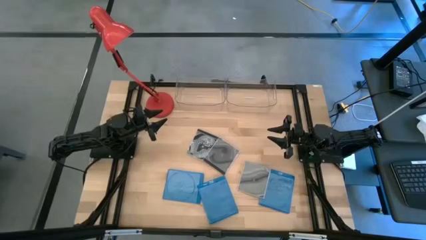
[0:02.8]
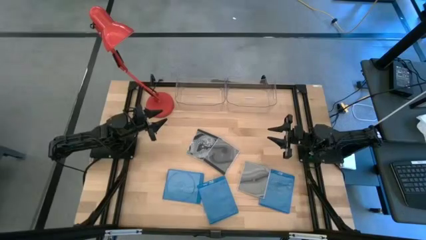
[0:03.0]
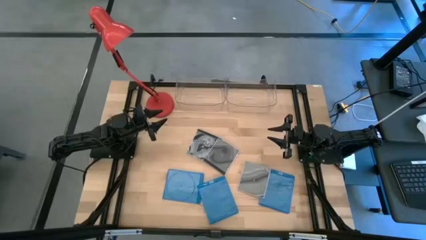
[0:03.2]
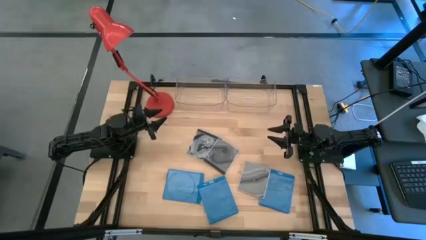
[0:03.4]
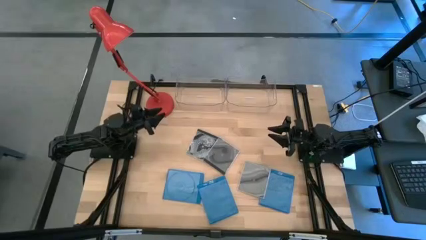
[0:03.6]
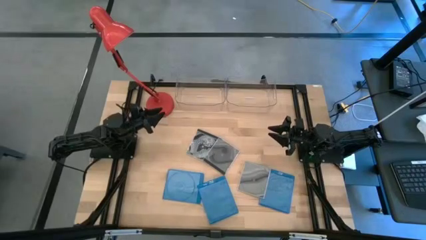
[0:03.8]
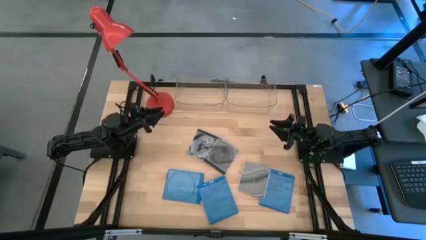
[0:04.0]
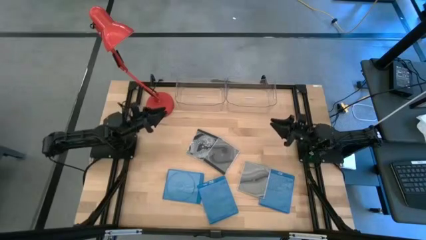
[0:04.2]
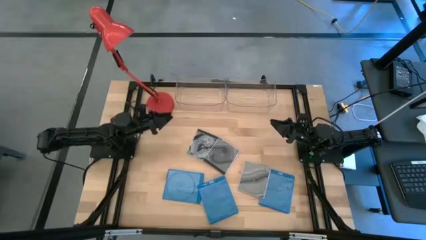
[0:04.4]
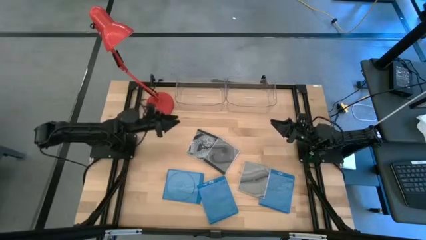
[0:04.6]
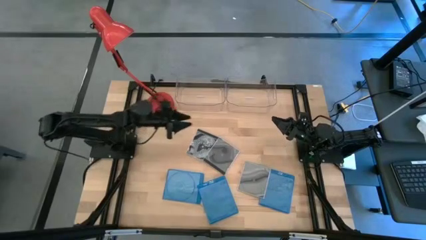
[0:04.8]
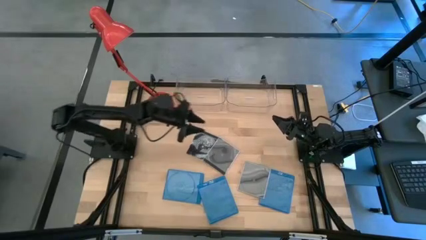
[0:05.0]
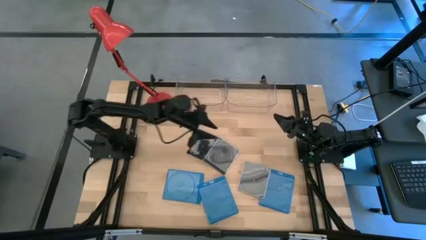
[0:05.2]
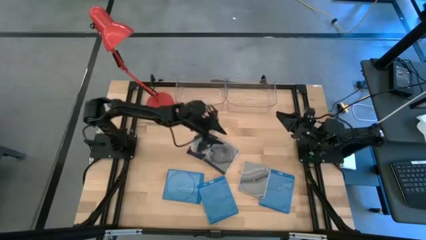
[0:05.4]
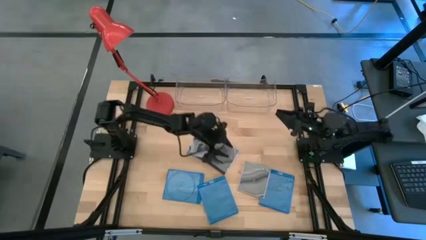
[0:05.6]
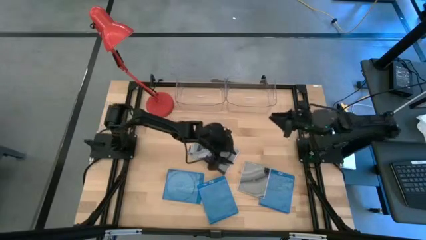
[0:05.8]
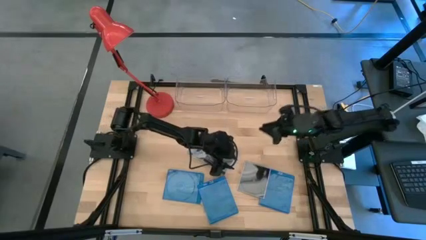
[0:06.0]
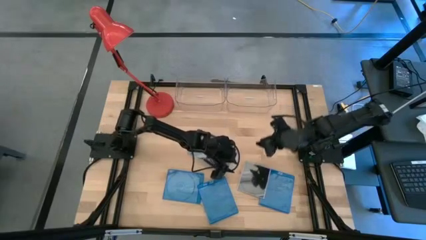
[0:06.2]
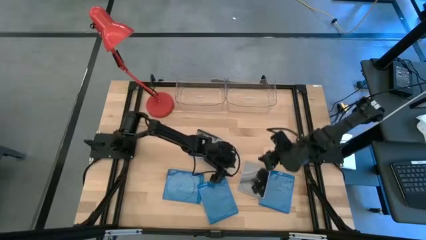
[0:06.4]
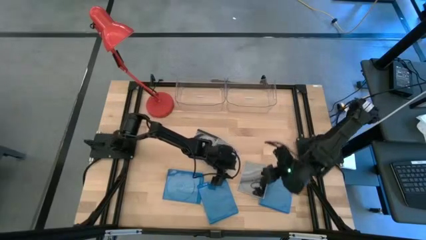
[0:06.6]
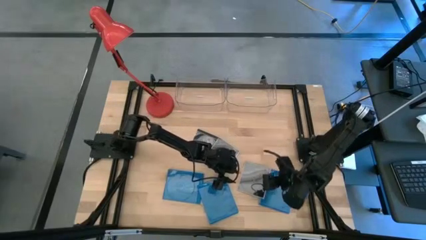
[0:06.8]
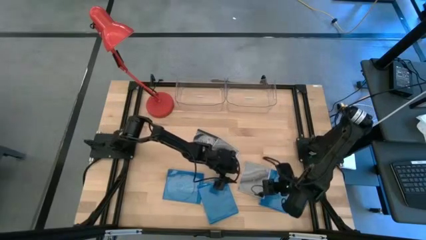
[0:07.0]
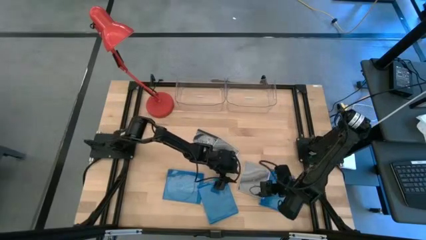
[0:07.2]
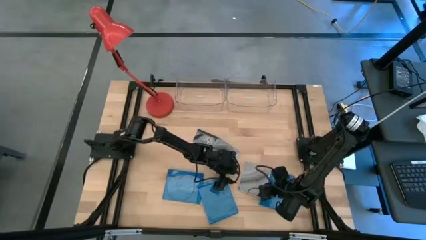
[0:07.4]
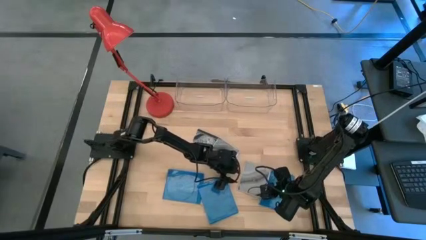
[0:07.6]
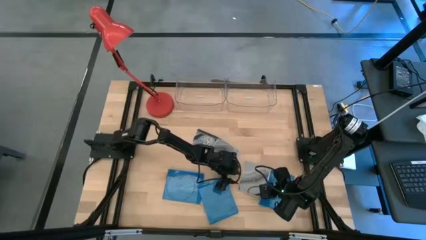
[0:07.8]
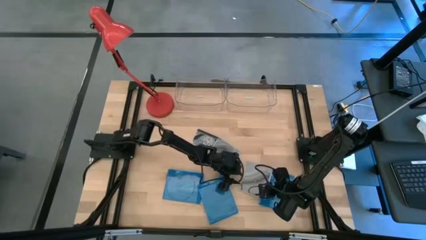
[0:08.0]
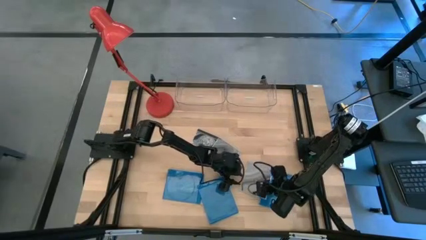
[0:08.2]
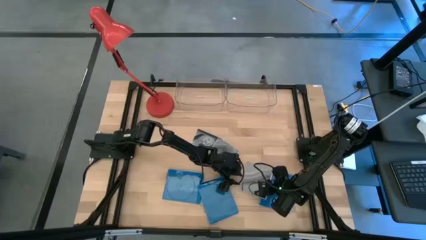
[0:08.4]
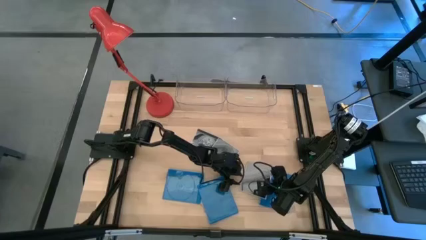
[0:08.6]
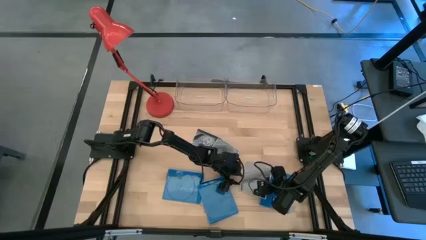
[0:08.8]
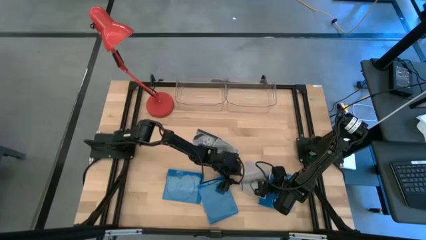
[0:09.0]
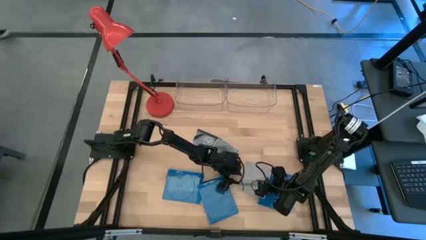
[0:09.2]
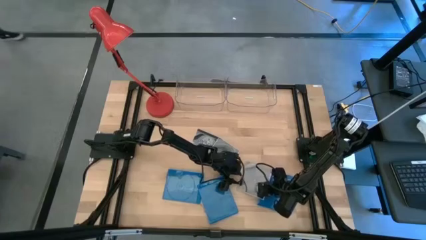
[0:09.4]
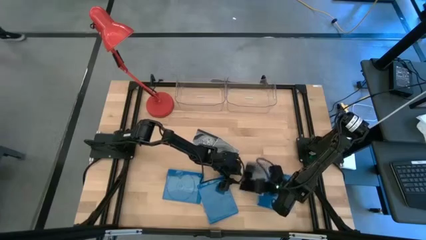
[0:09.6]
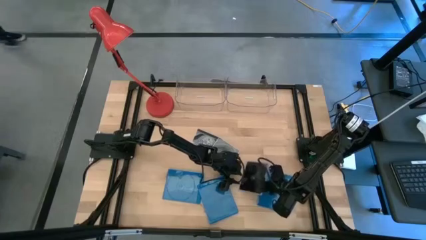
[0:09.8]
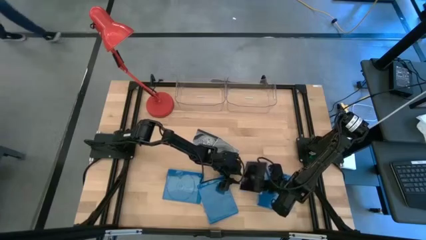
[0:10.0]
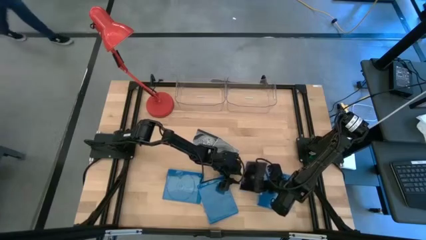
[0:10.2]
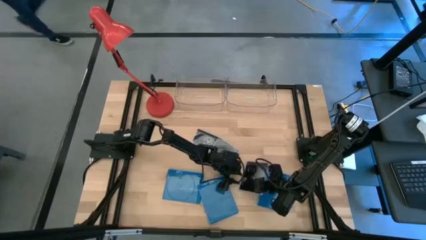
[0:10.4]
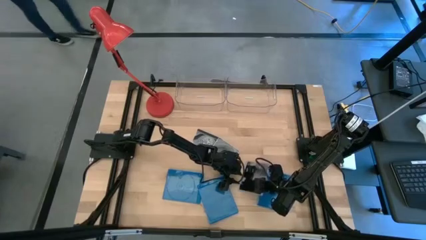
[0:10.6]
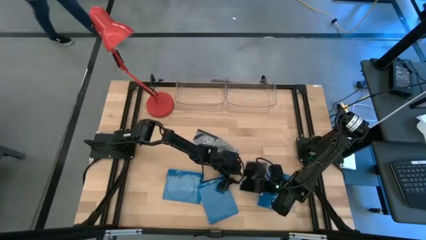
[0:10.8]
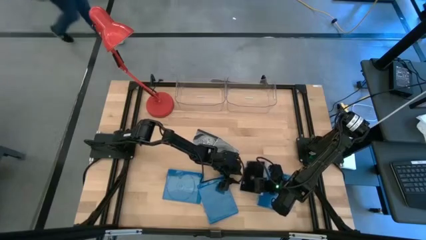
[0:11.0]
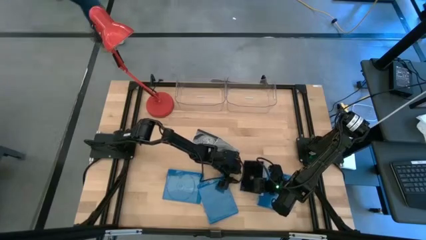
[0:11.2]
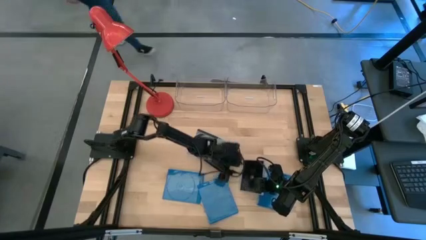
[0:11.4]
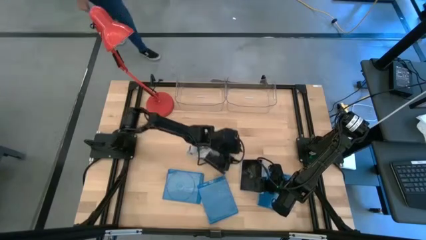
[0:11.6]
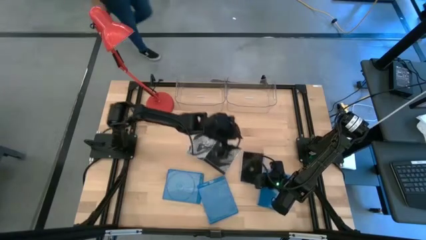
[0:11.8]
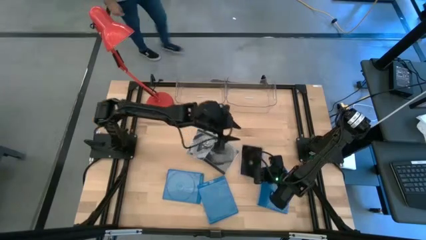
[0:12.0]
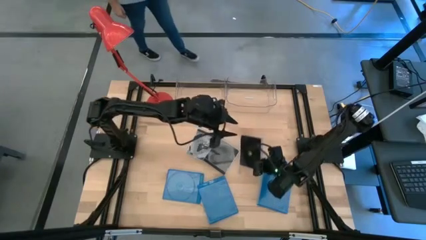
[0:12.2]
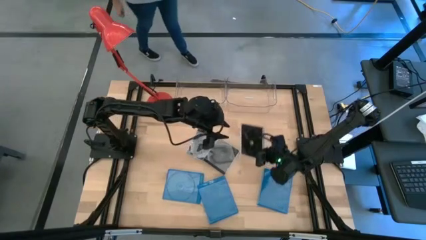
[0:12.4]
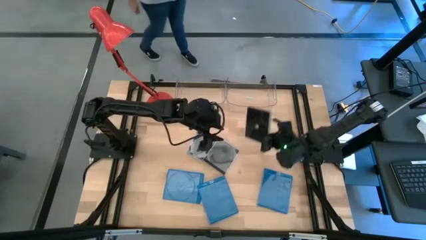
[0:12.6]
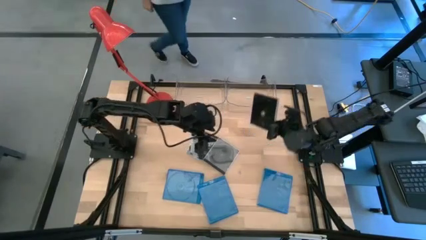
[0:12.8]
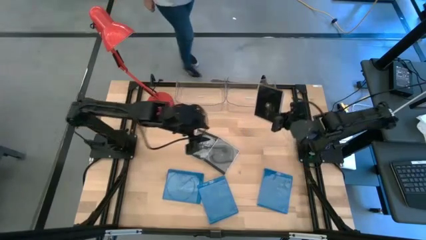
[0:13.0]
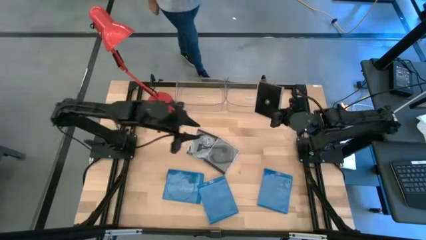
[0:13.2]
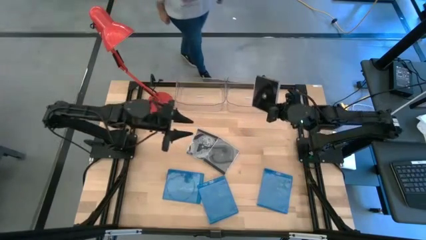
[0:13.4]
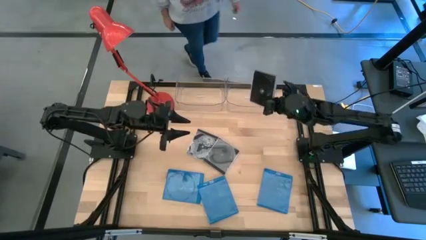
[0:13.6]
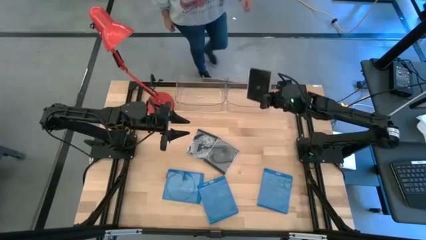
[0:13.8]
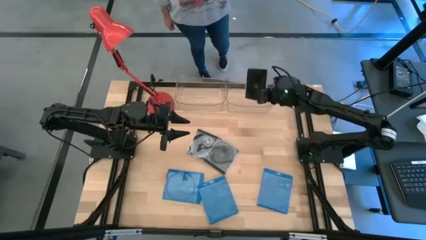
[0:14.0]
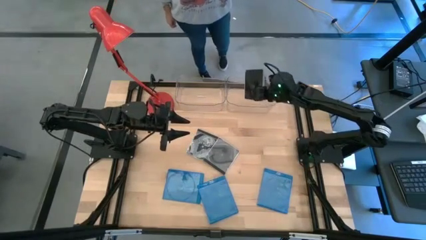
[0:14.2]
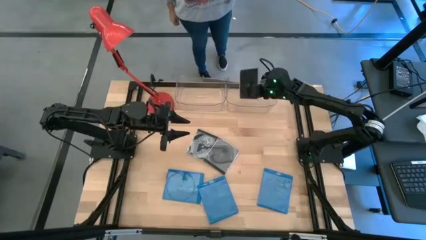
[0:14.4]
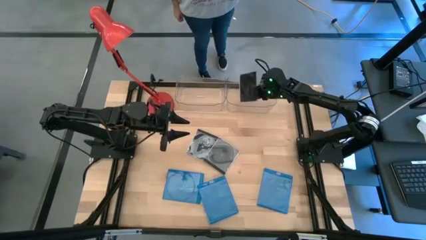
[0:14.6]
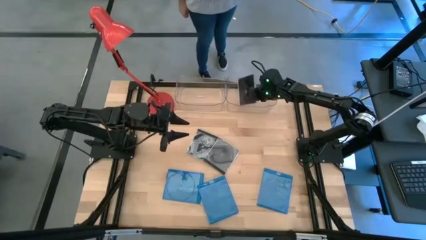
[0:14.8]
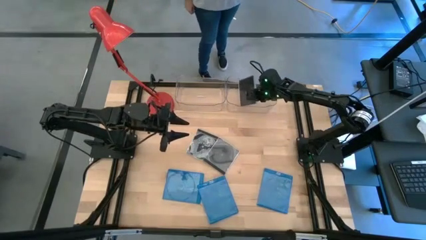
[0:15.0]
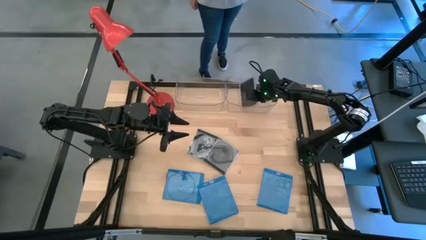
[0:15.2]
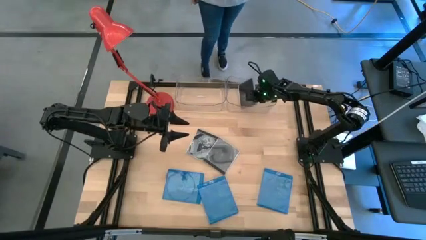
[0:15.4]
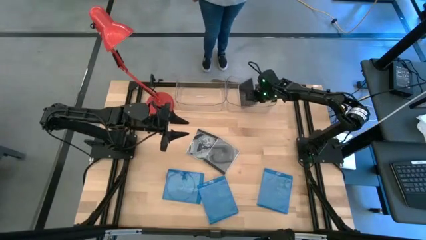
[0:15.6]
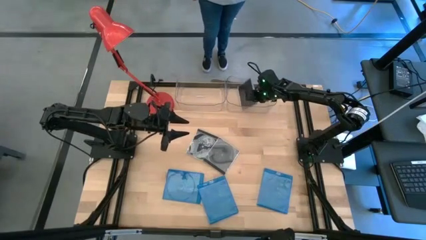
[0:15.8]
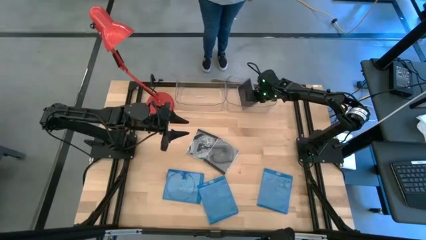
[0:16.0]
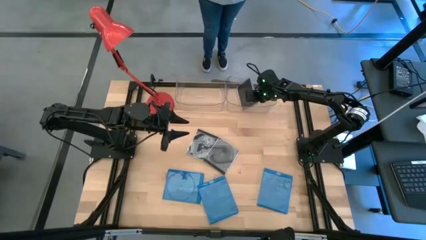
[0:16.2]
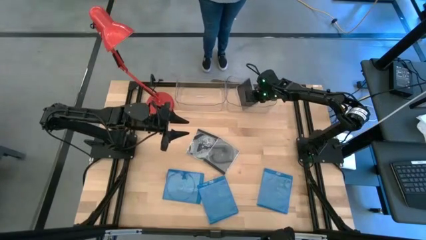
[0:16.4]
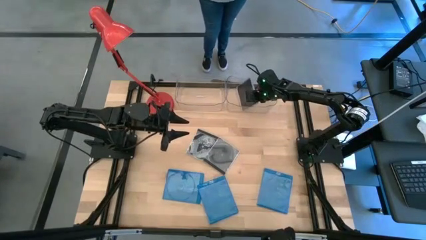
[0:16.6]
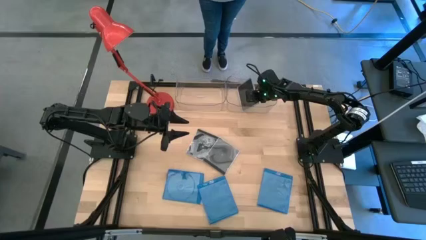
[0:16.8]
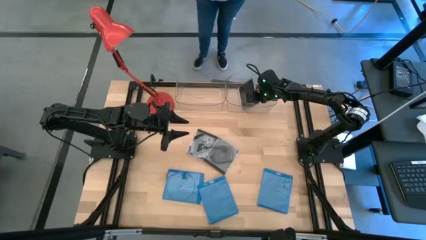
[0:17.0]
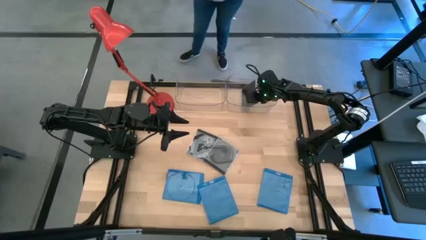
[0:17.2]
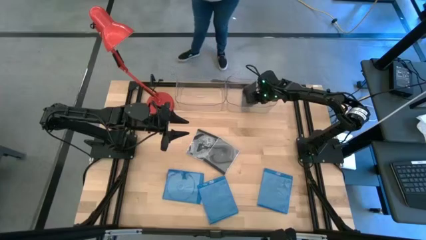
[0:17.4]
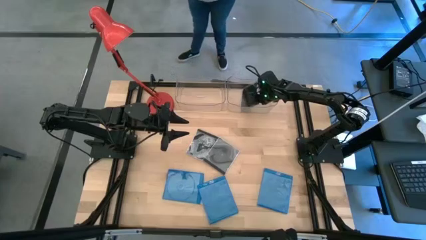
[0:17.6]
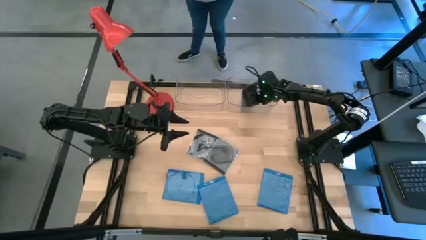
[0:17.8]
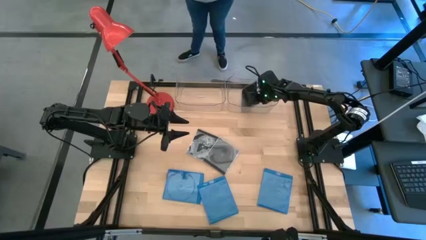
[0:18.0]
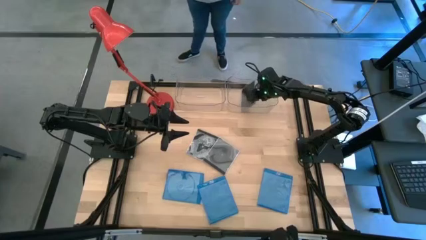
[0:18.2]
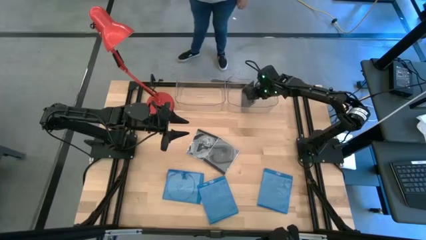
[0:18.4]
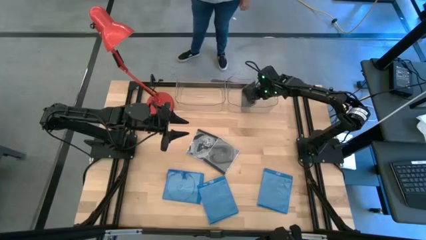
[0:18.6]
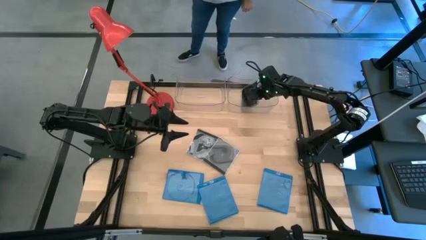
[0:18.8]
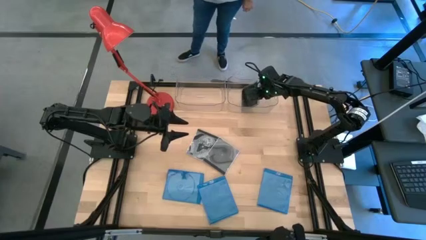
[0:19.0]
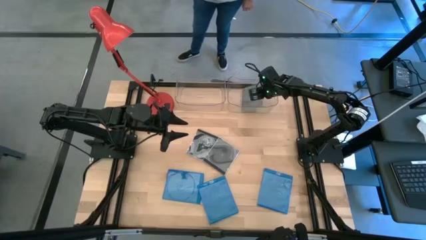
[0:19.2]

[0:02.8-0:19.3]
Task: Pick & place jewel cases by type
Put the bottom right black cd case into the right transparent bin
